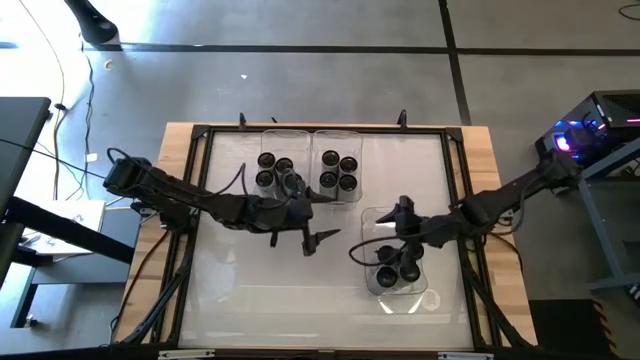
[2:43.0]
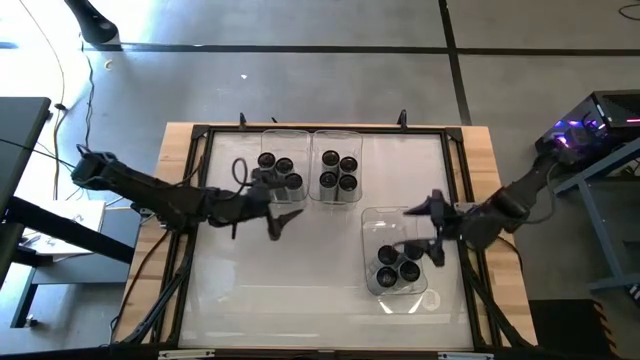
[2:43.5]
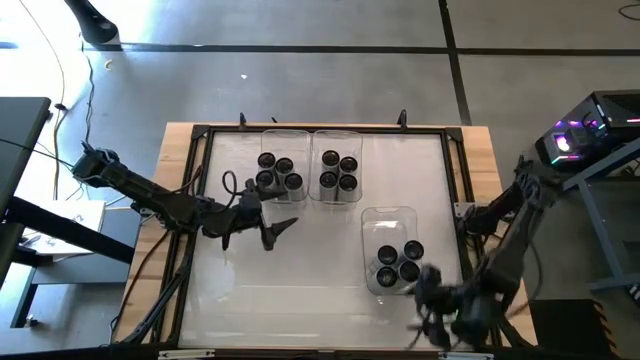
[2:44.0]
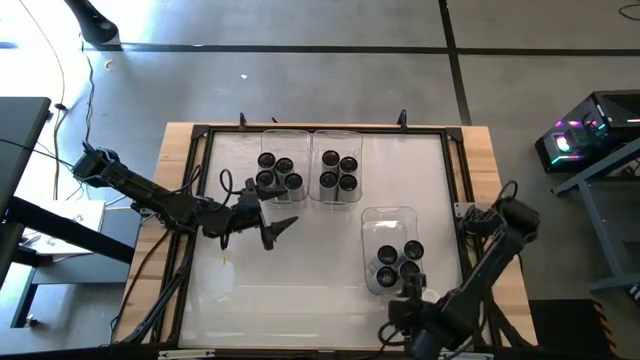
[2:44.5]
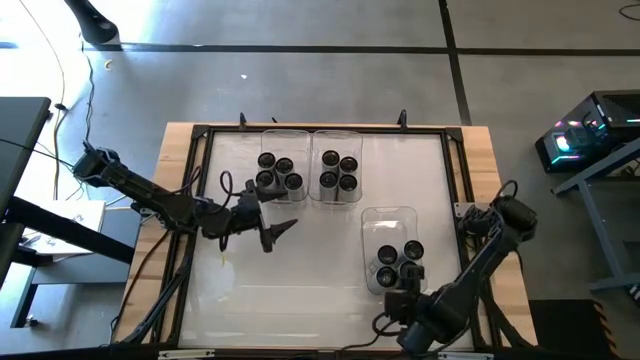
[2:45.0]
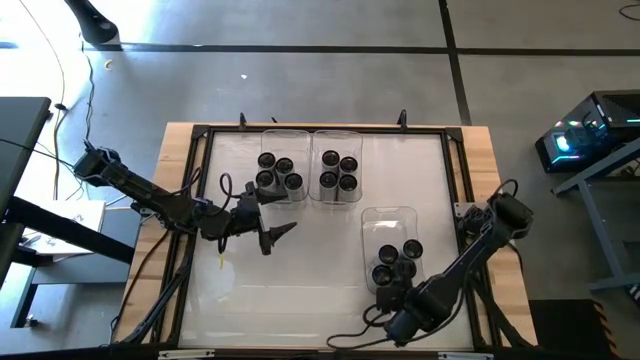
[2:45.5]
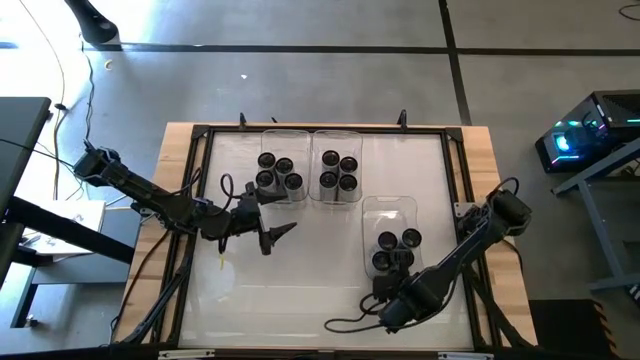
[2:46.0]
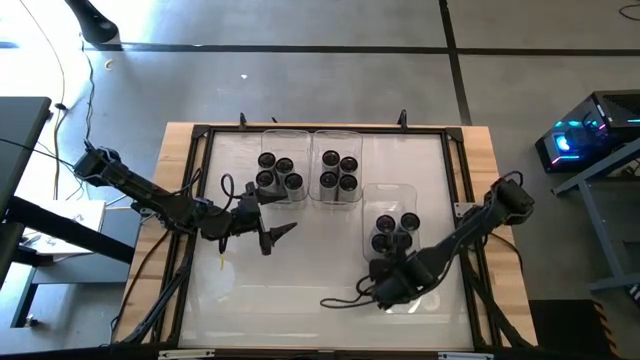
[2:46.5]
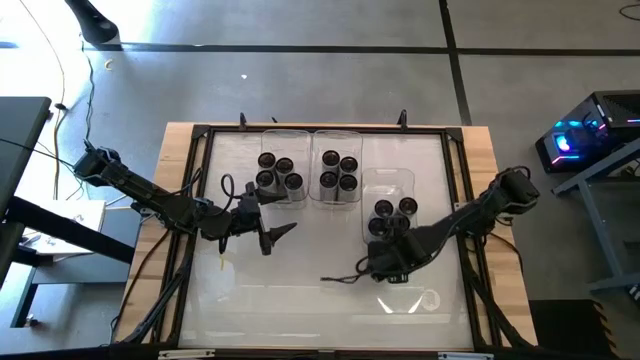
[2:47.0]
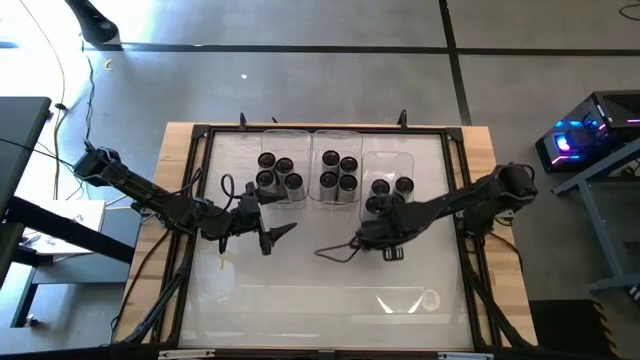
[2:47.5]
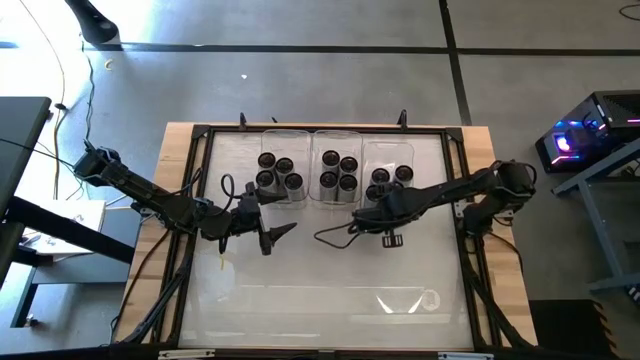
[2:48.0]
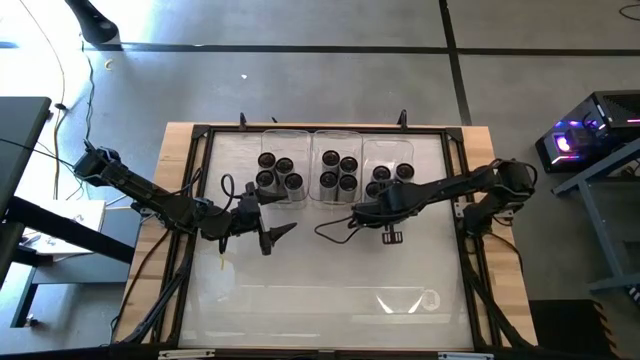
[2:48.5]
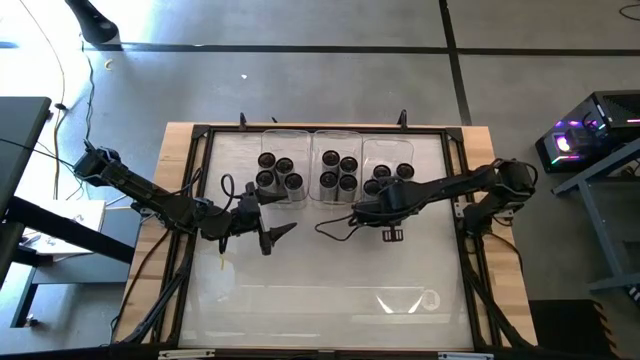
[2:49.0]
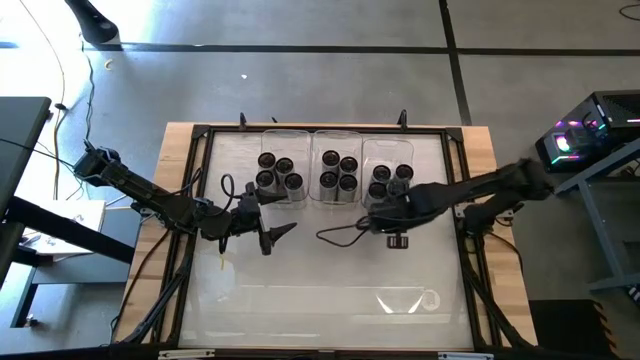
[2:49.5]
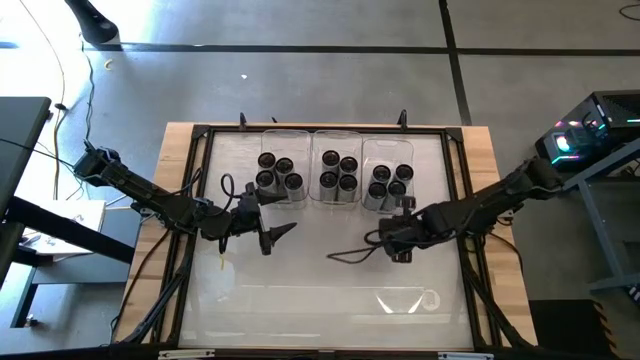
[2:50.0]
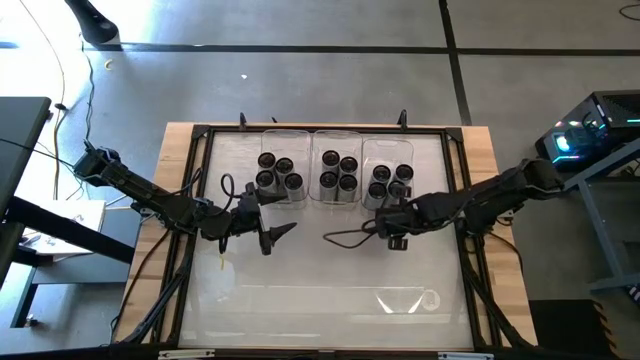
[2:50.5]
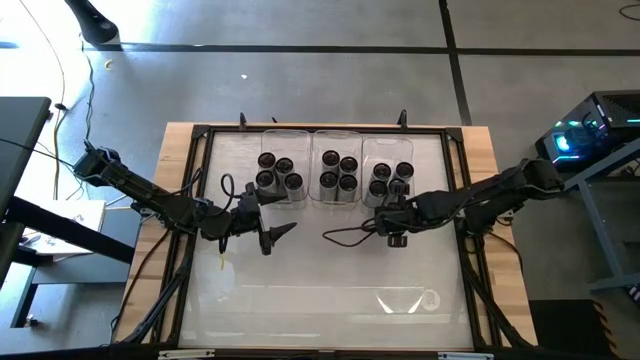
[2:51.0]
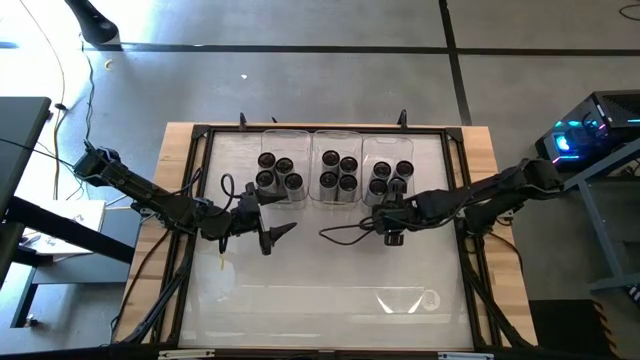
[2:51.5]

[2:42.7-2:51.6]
Task: Sort soda cans
Move the transparent bins to the top center of the table

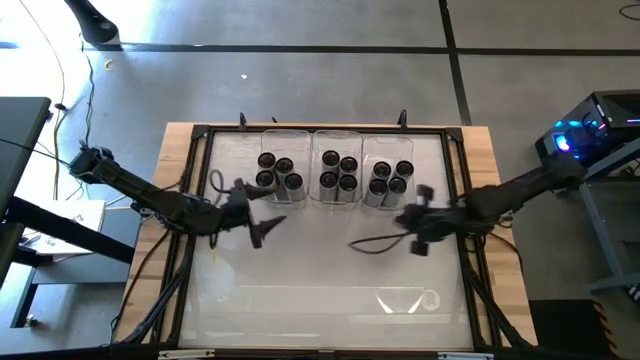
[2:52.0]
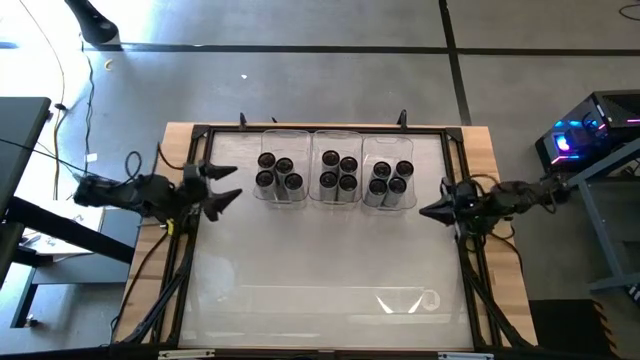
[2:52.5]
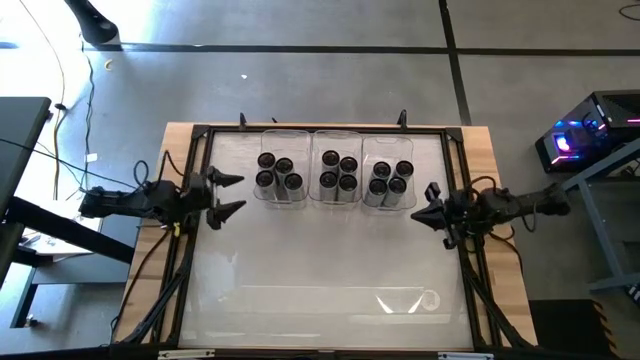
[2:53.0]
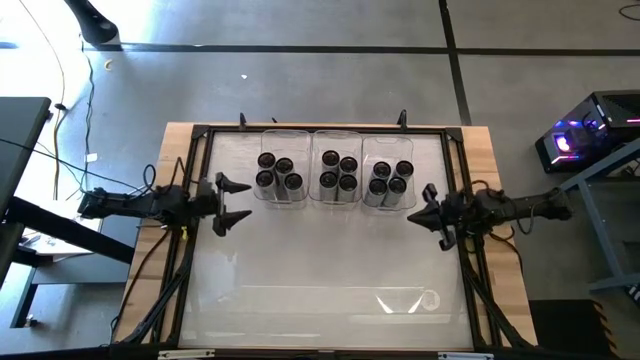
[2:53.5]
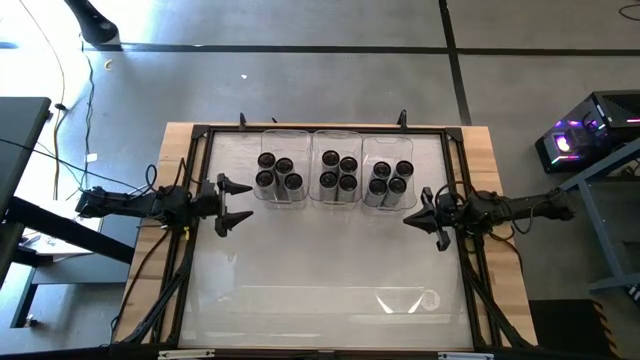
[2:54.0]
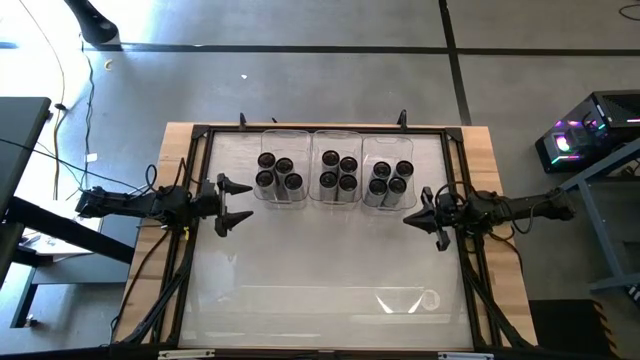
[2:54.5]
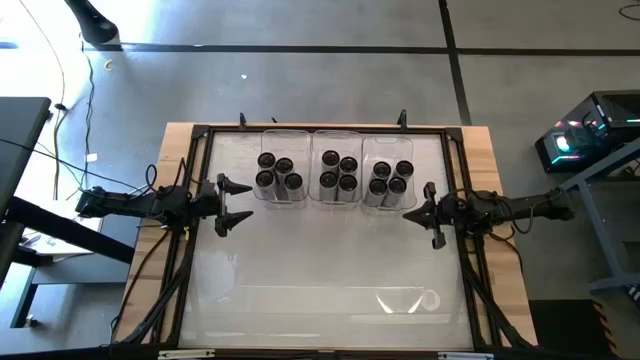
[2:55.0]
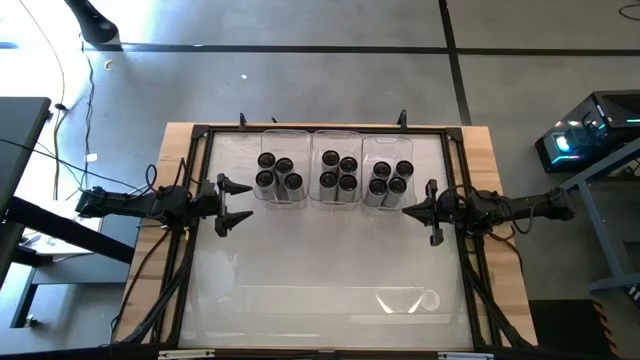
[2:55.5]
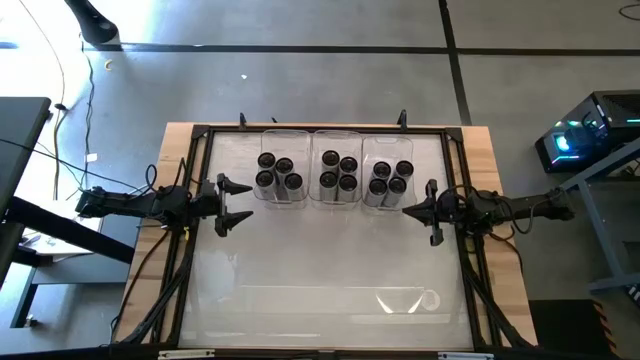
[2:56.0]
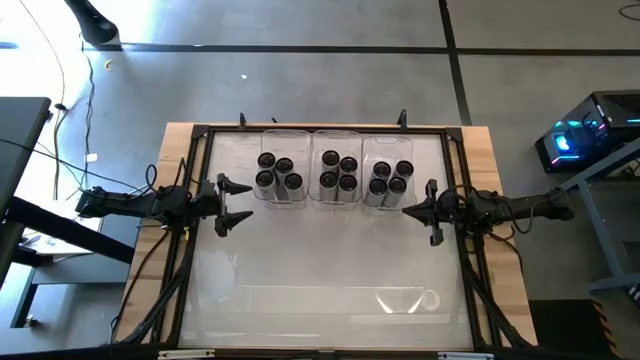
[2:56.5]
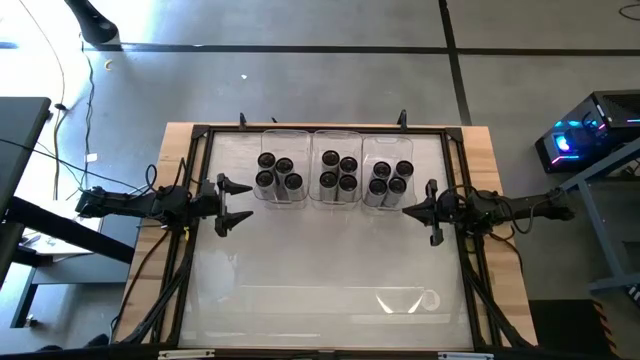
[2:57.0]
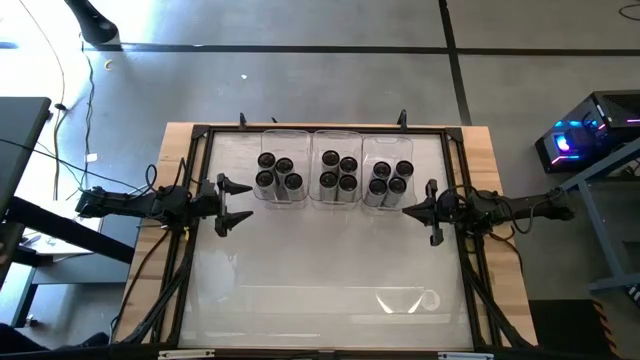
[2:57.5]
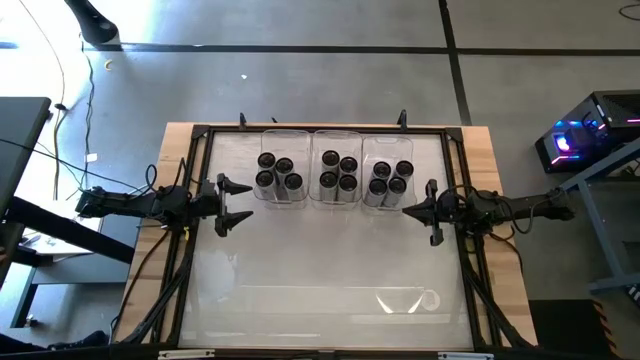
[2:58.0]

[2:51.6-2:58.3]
Return to Home Position

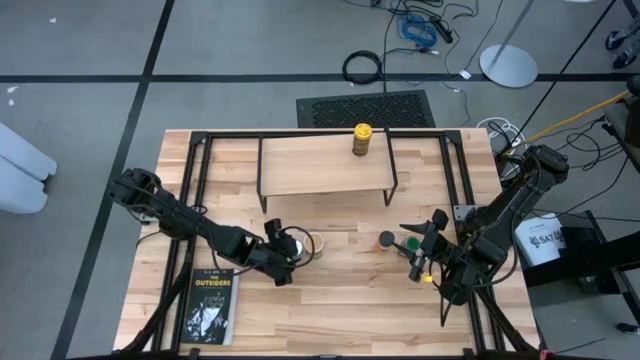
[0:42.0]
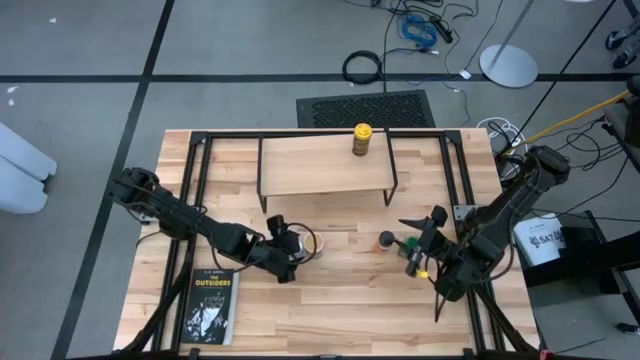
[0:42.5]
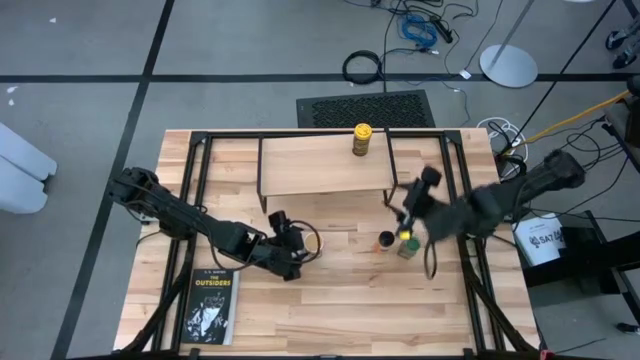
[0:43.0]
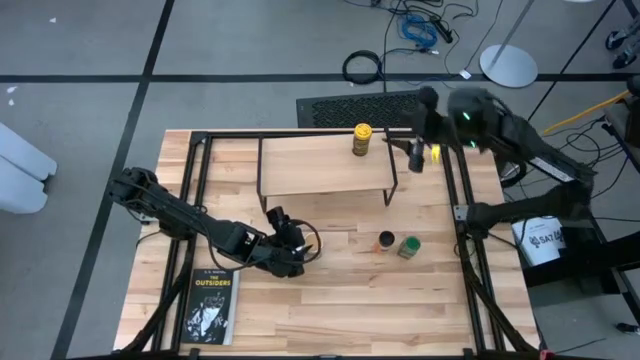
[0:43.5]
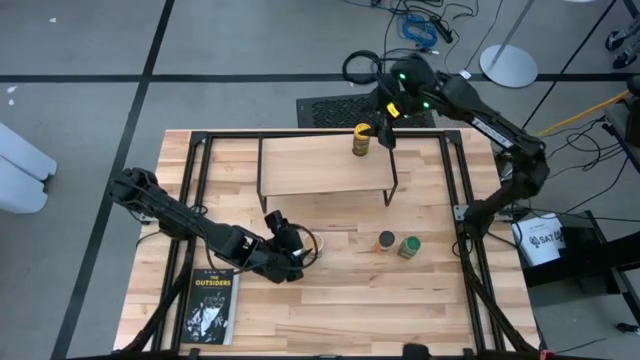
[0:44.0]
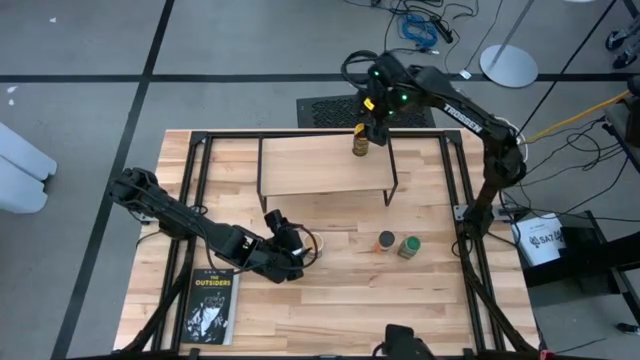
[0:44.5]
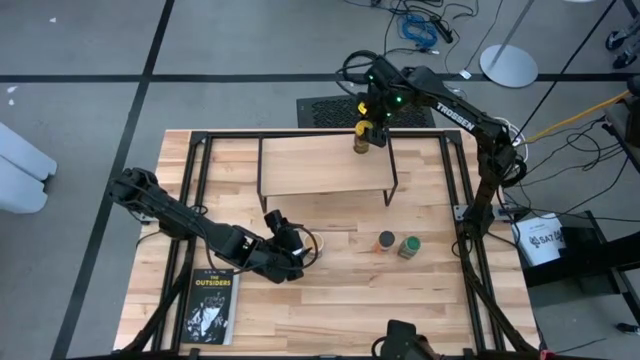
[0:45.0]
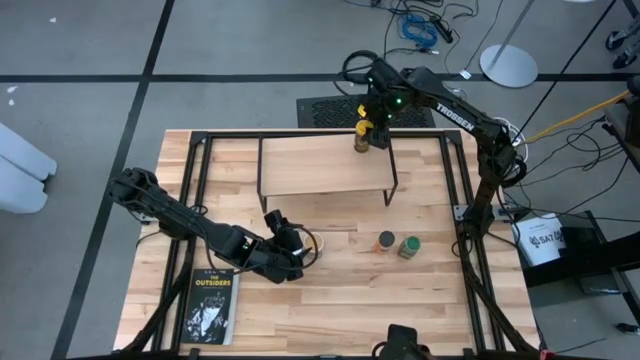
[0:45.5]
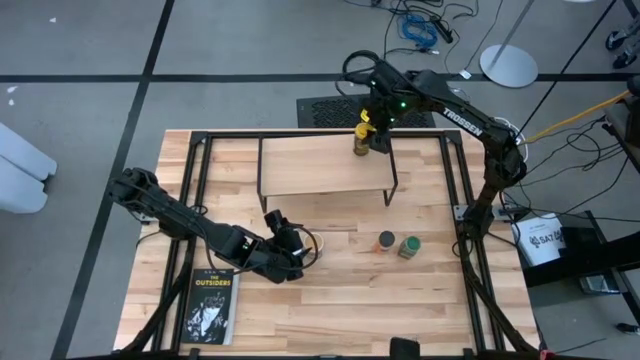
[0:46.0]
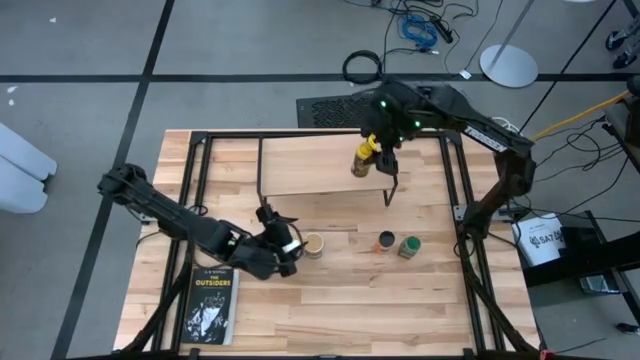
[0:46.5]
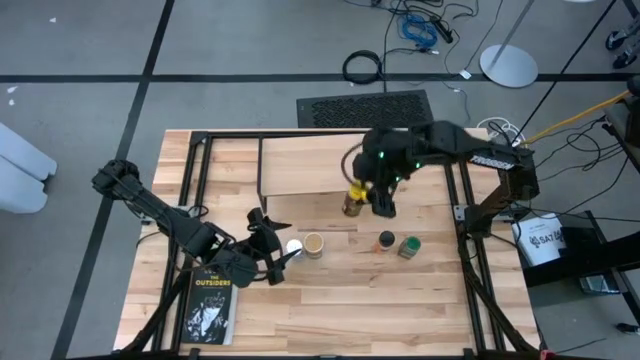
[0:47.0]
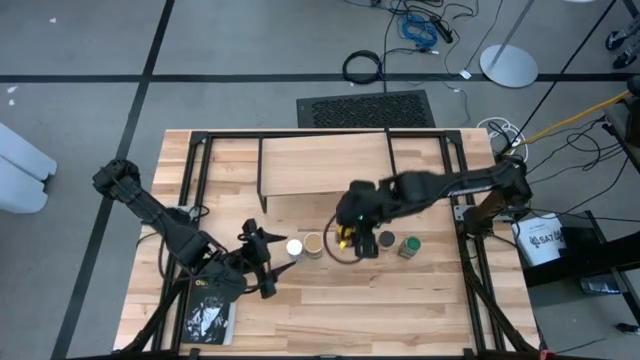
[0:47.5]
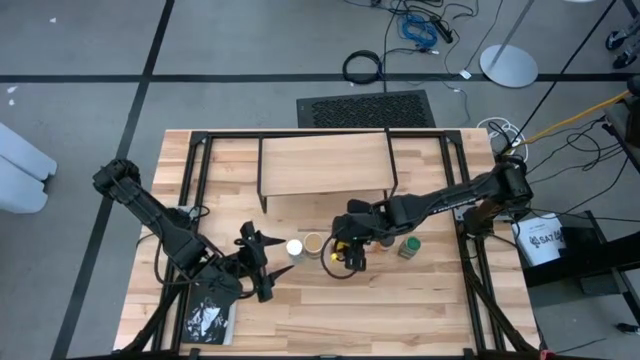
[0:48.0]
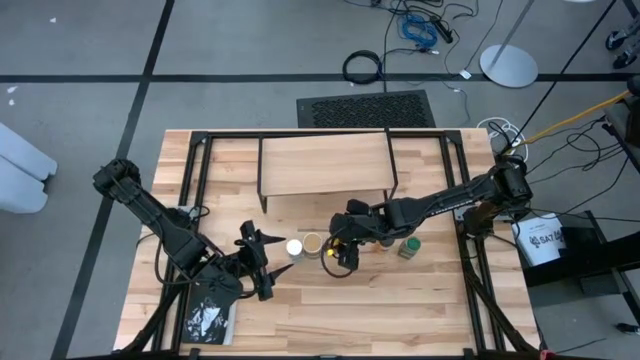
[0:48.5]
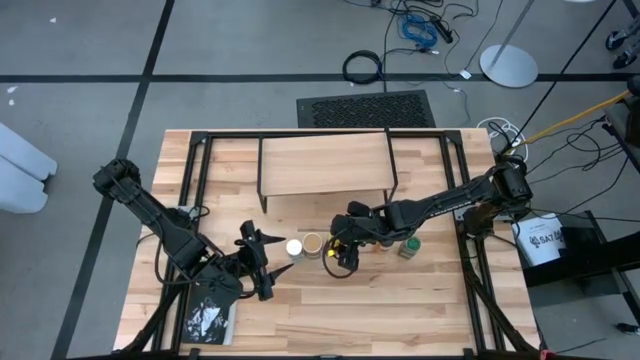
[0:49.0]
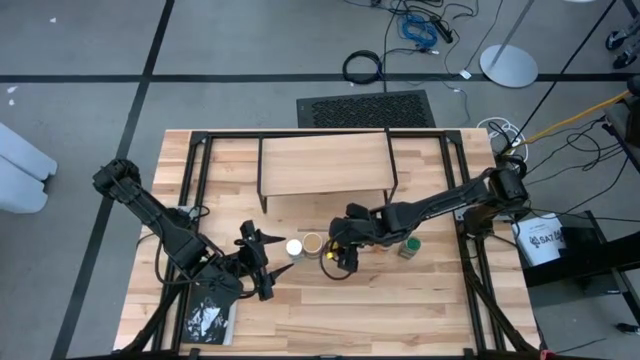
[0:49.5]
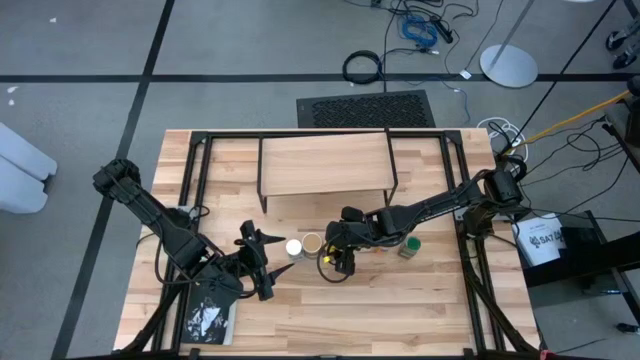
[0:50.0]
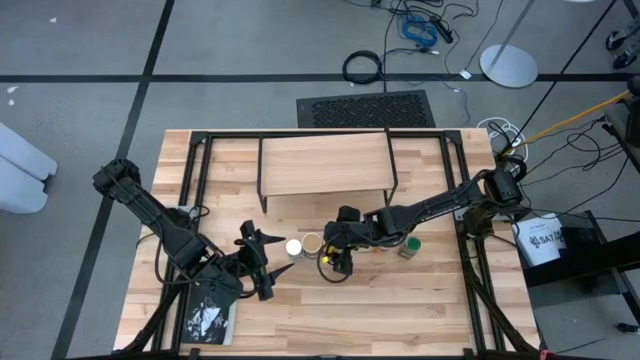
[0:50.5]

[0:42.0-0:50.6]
Task: Shelf spices
Remove the yellow black seasoning bottle from the shelf
